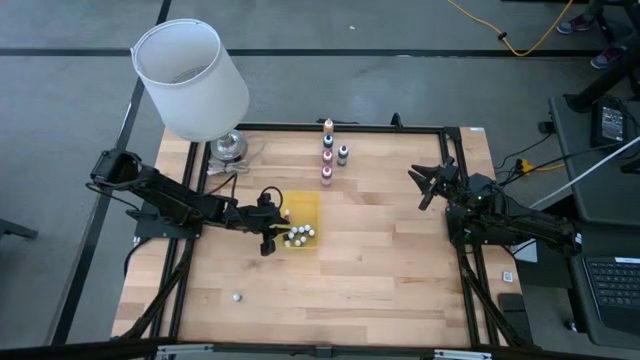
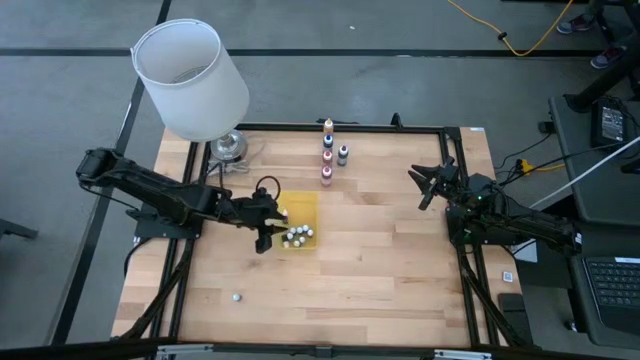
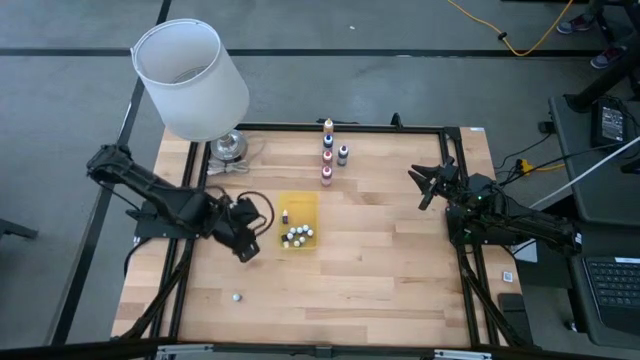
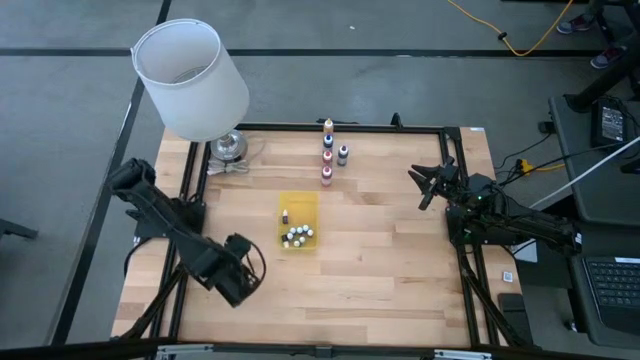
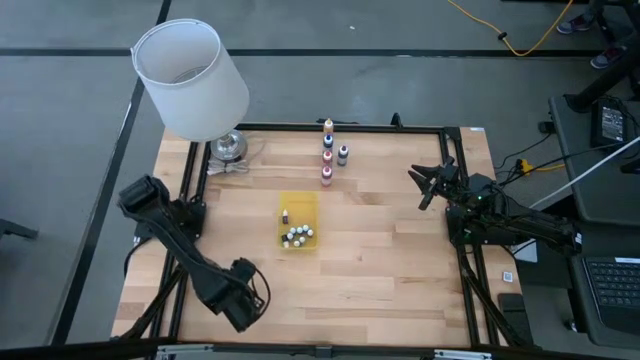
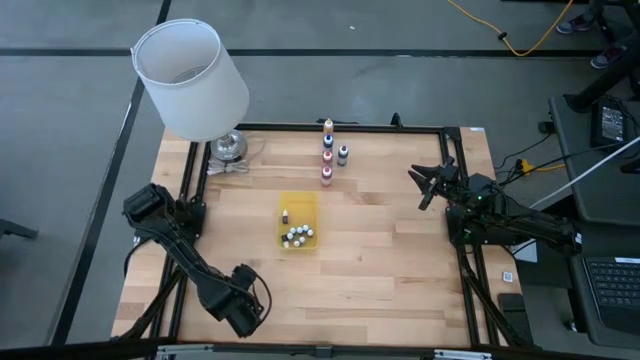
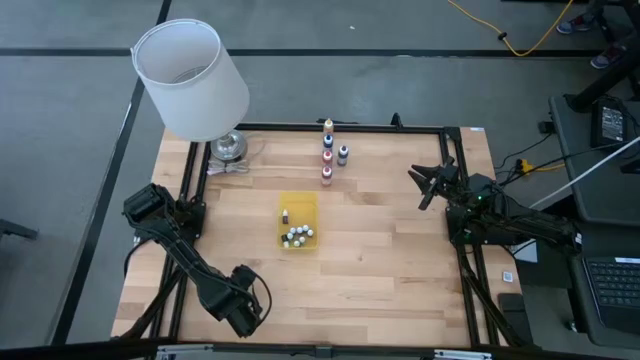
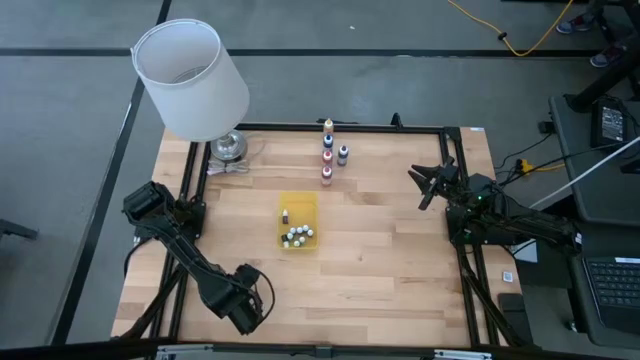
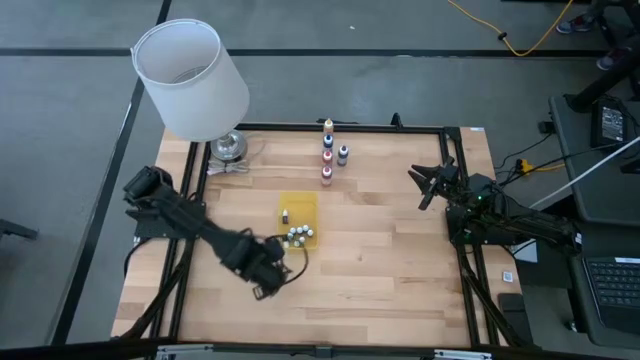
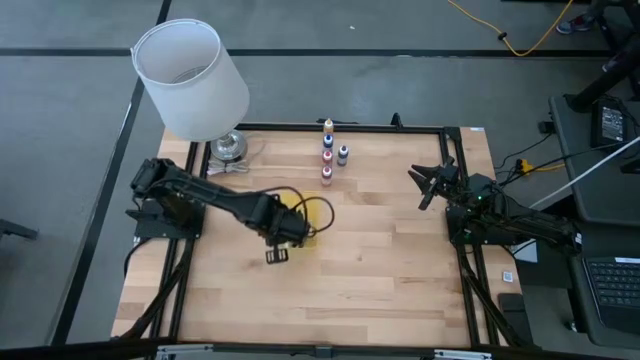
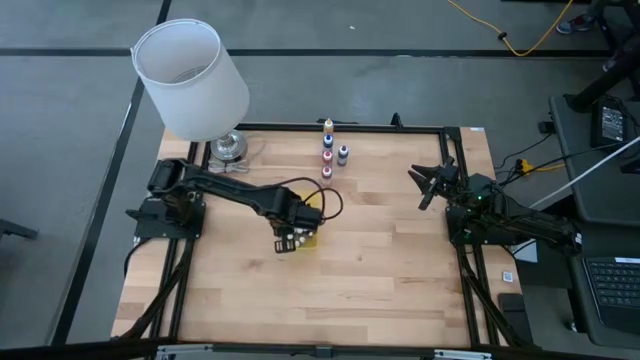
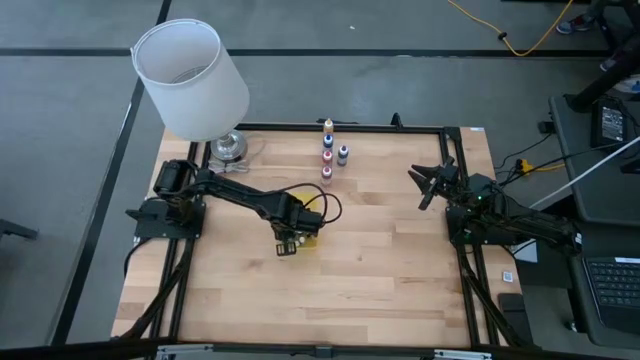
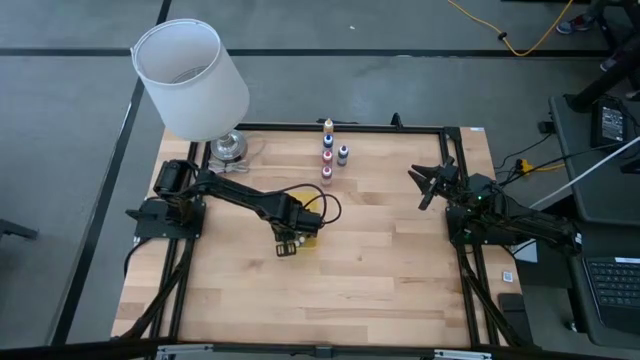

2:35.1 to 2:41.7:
Task: Pick & Place food coloring
Put the small red bottle into the yellow bin

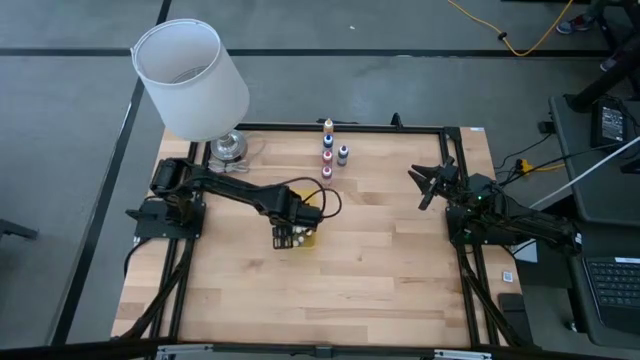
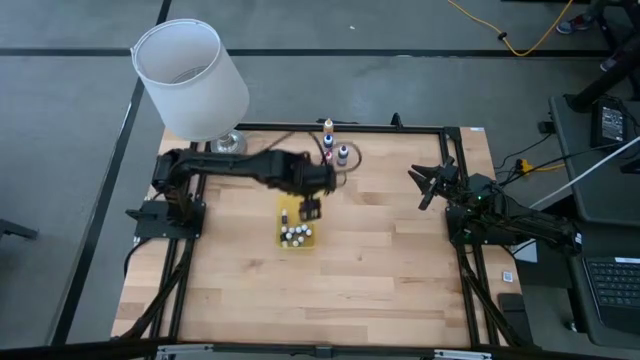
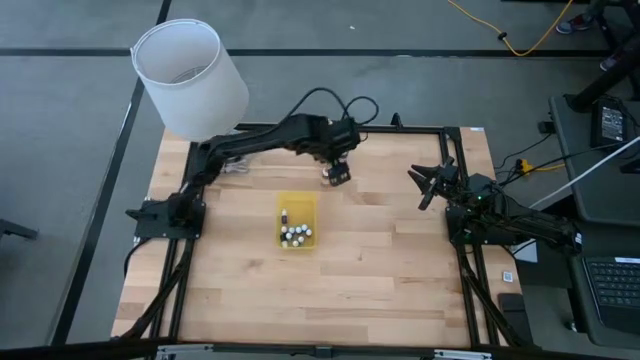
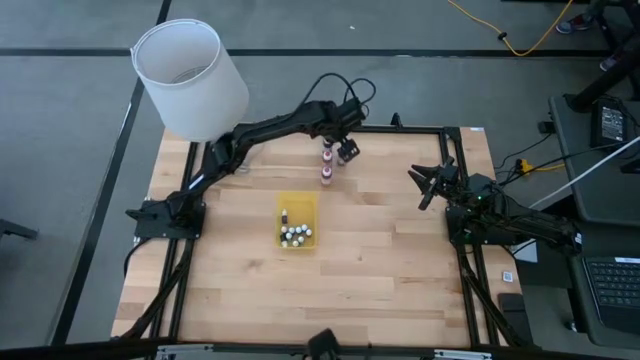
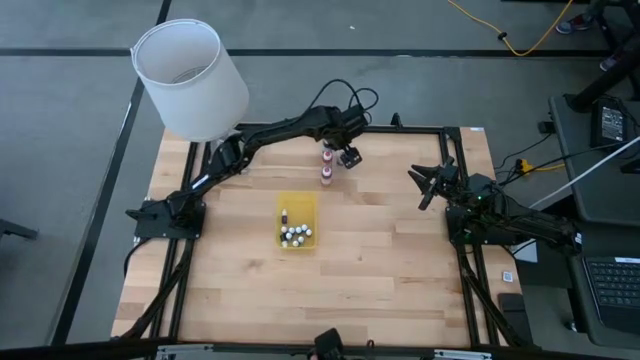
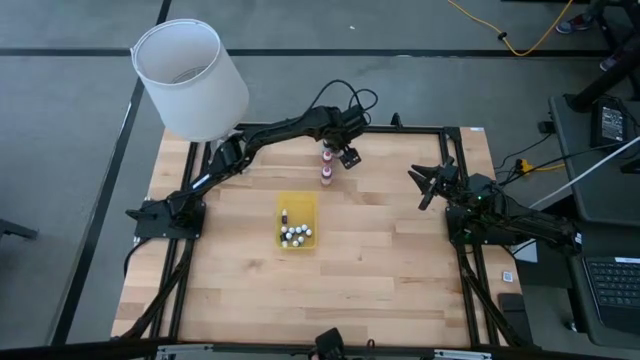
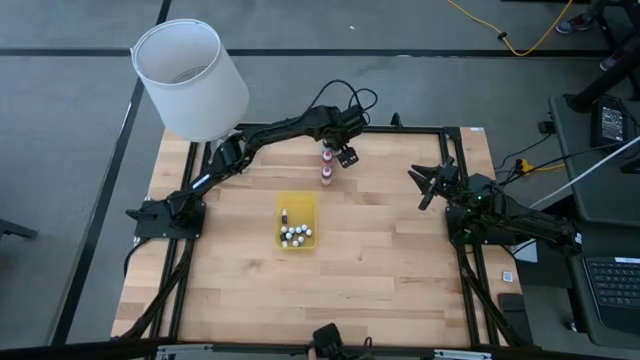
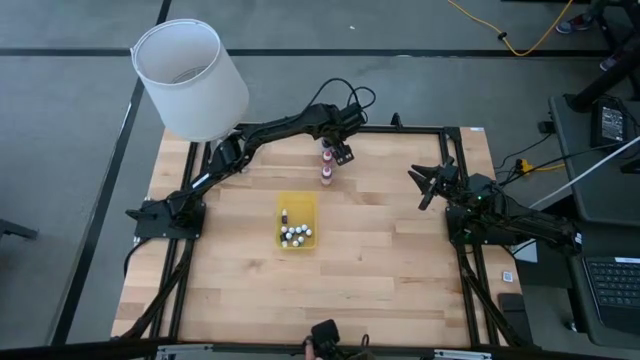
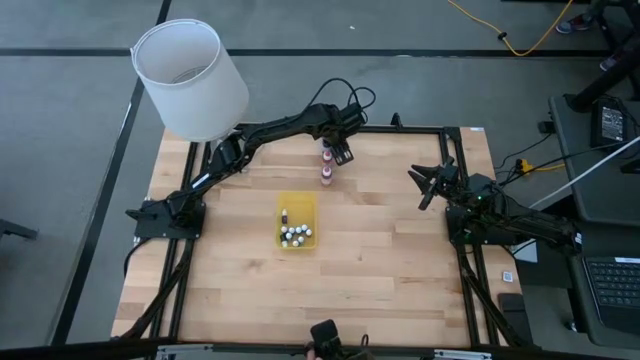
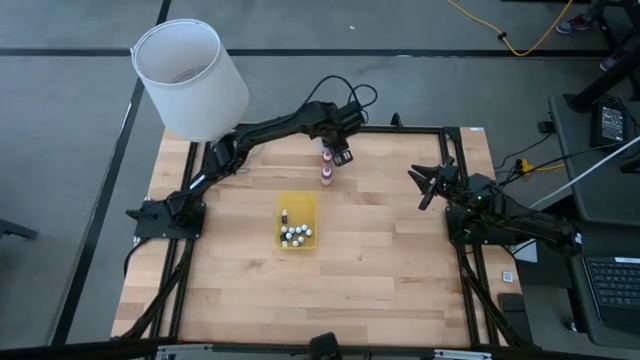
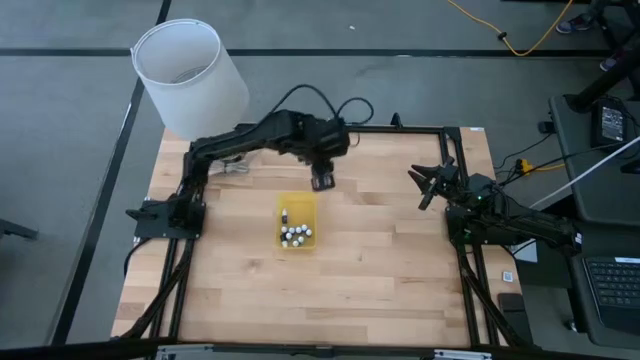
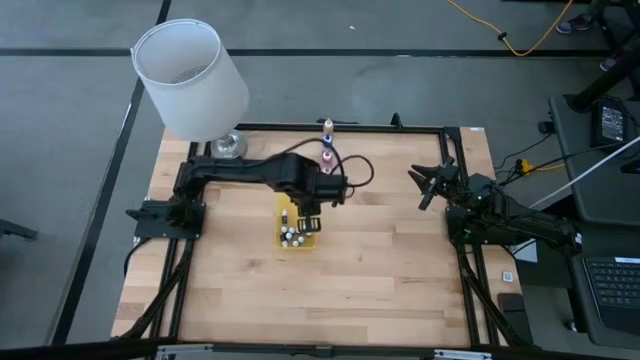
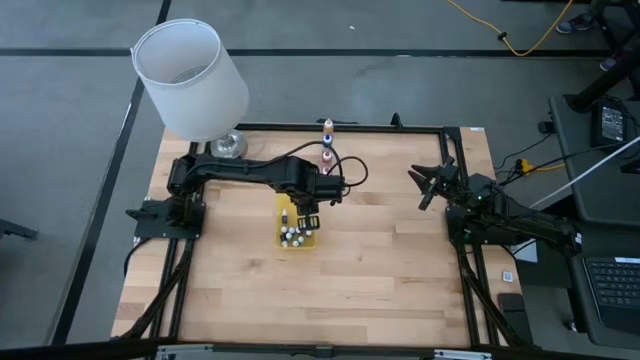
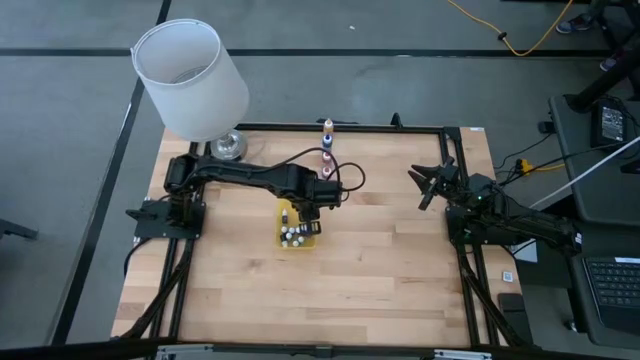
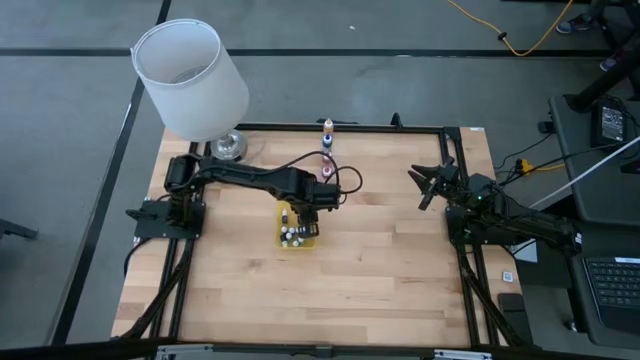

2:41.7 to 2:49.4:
Put the large purple bottle into the yellow bin

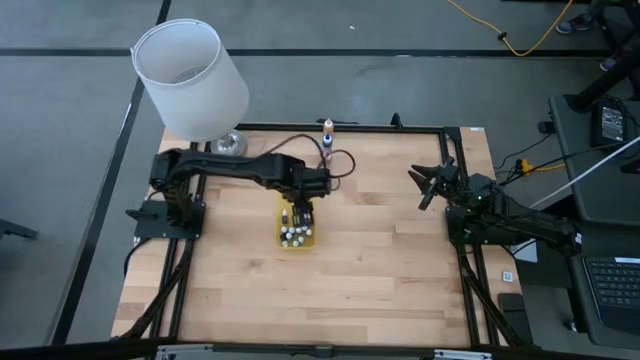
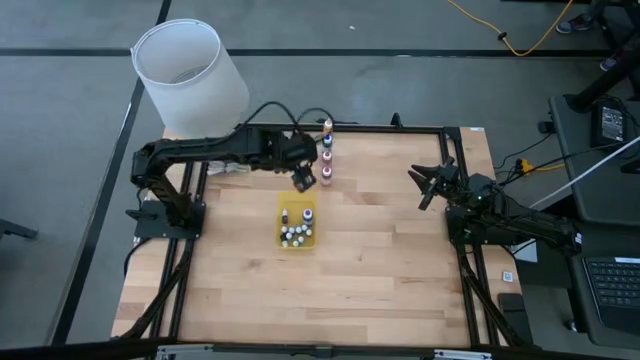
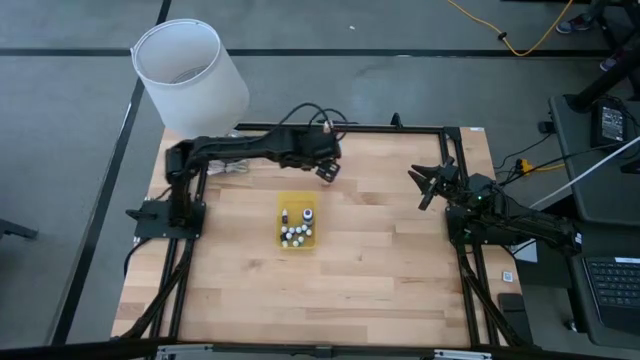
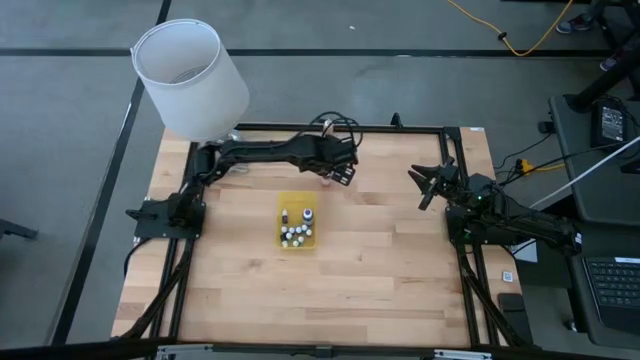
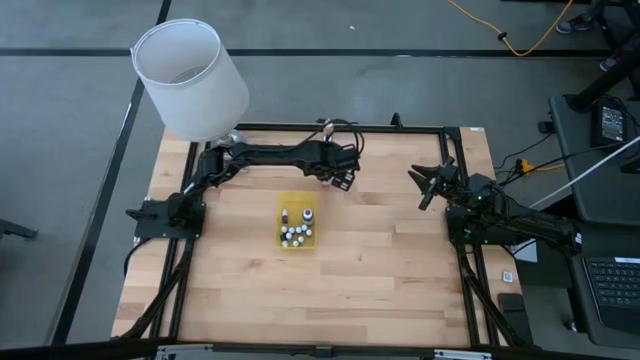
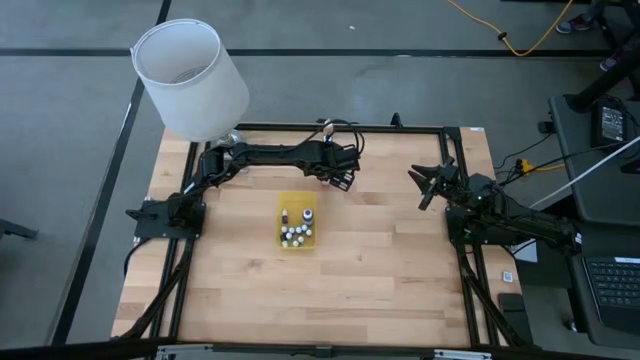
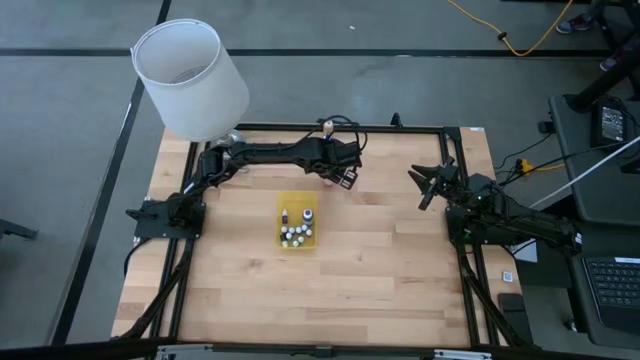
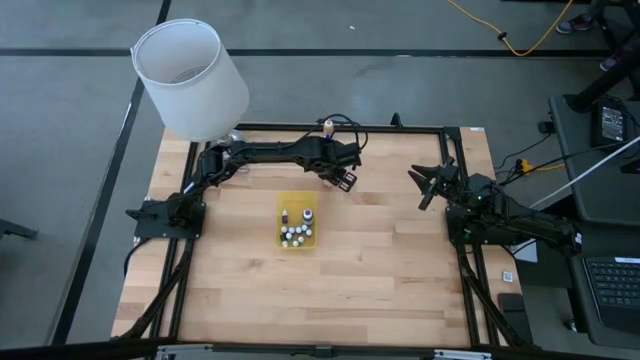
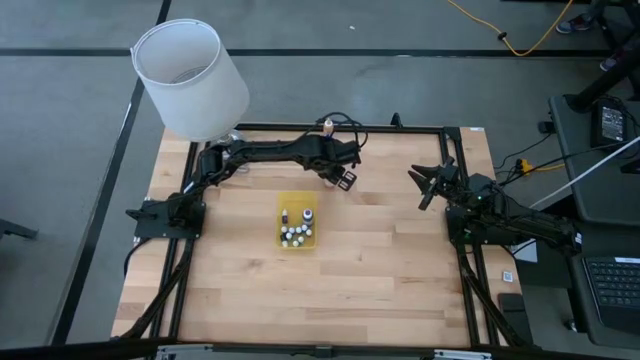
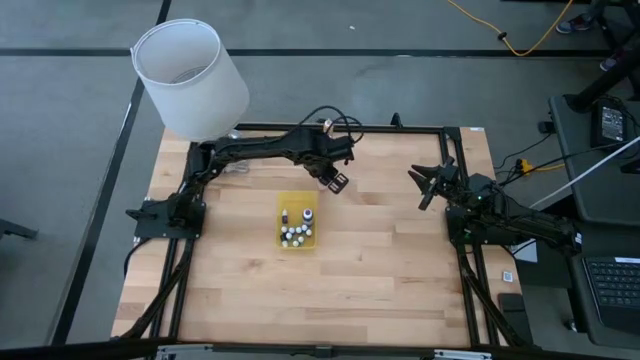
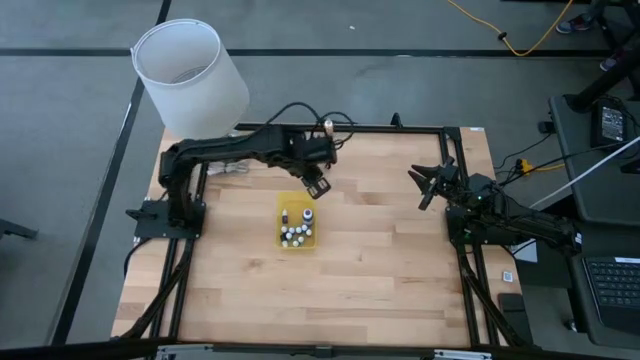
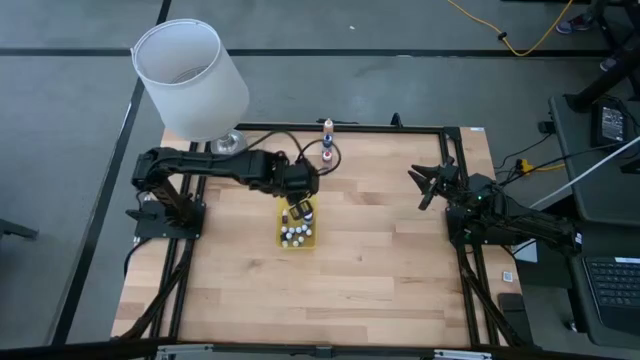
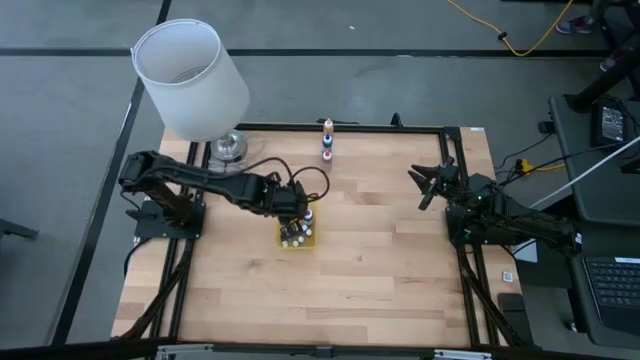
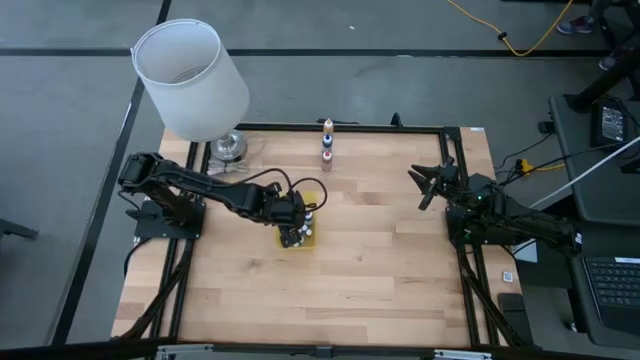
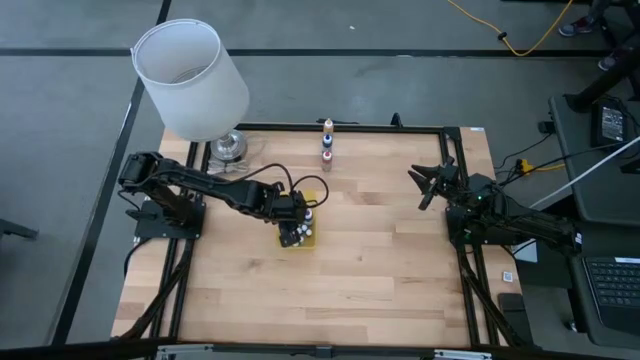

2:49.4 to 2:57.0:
Put the large pink bottle into the yellow bin
